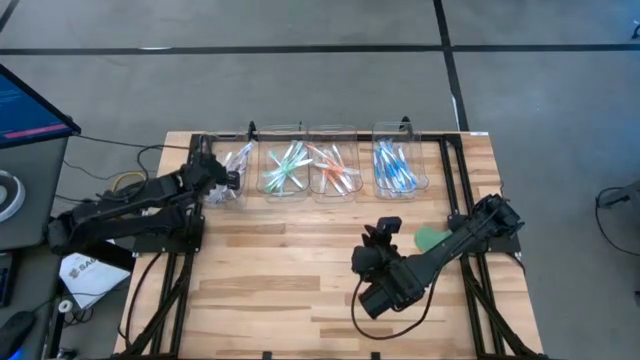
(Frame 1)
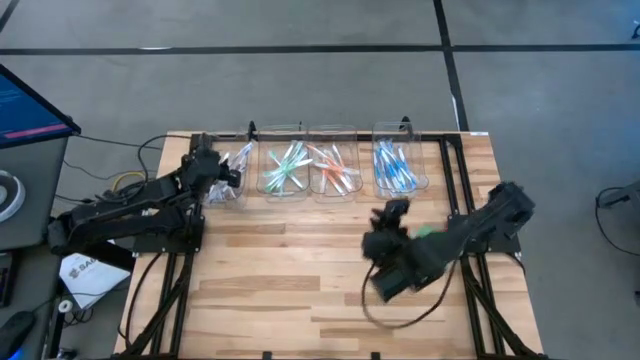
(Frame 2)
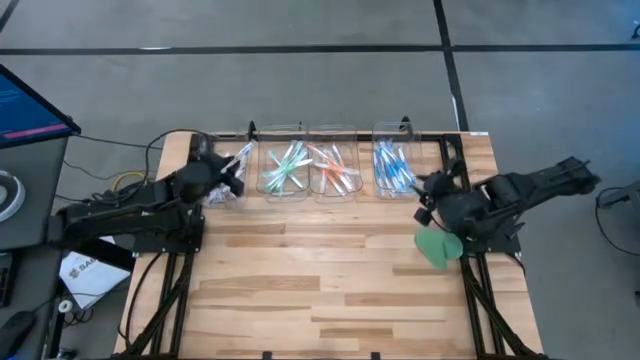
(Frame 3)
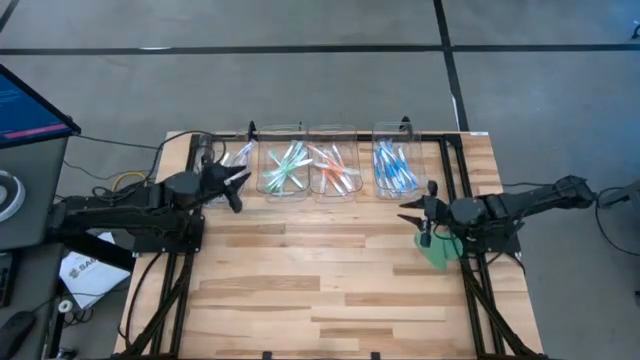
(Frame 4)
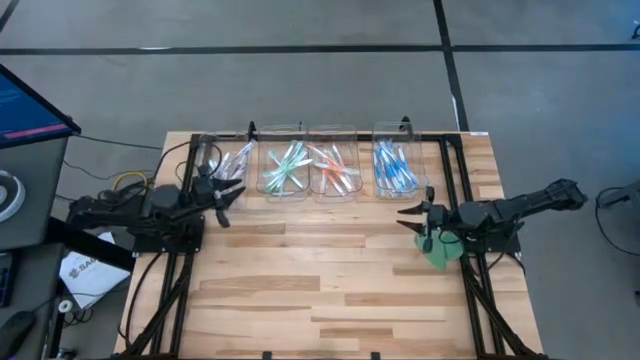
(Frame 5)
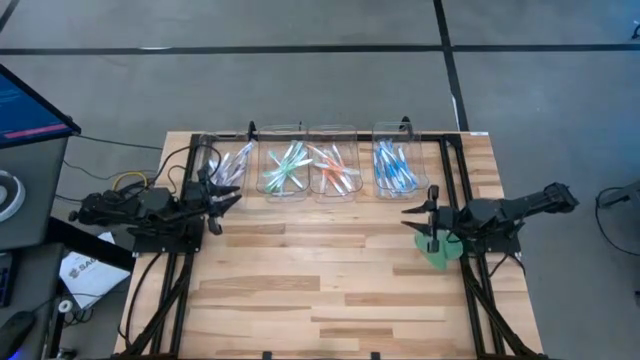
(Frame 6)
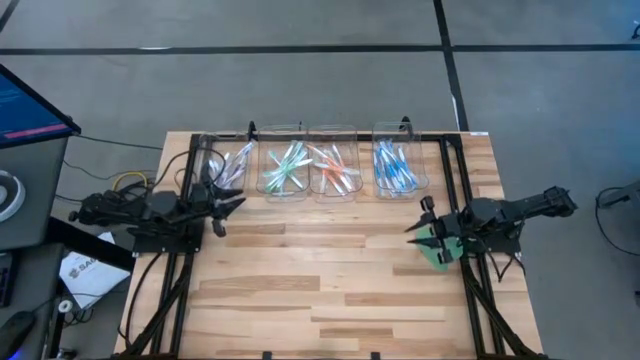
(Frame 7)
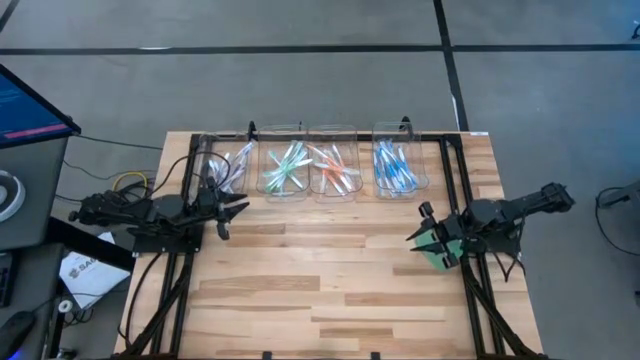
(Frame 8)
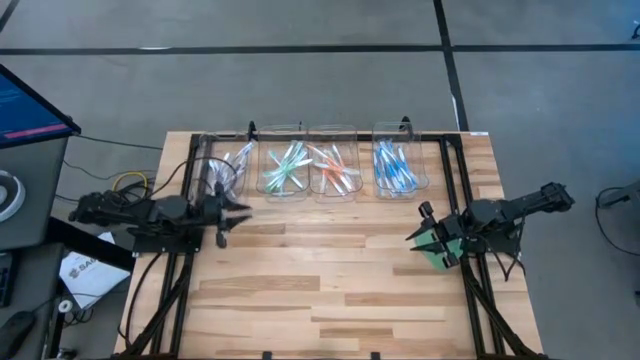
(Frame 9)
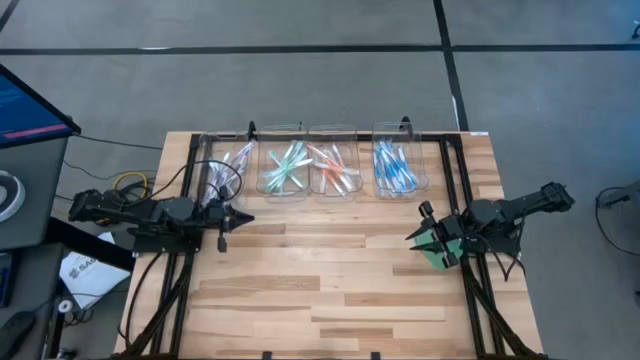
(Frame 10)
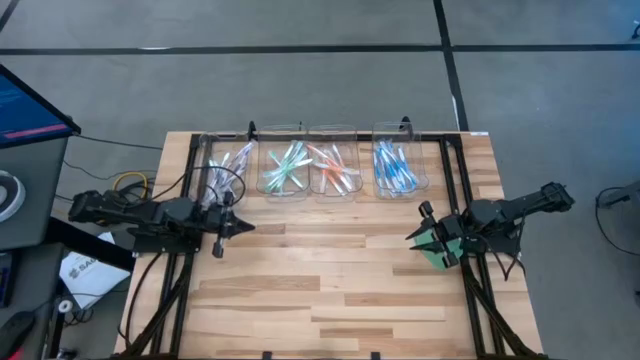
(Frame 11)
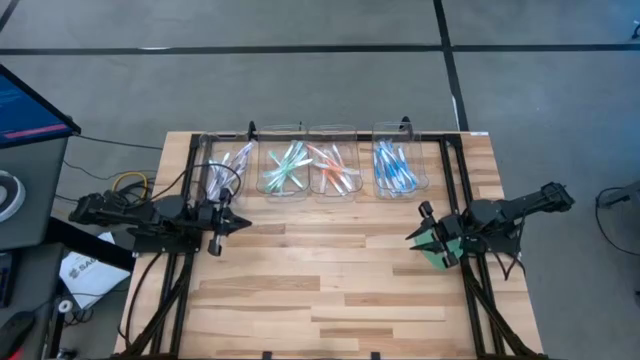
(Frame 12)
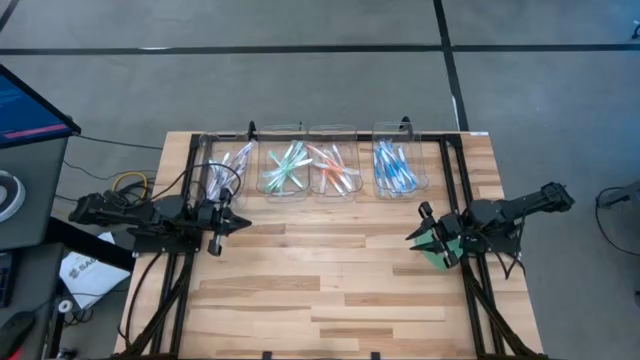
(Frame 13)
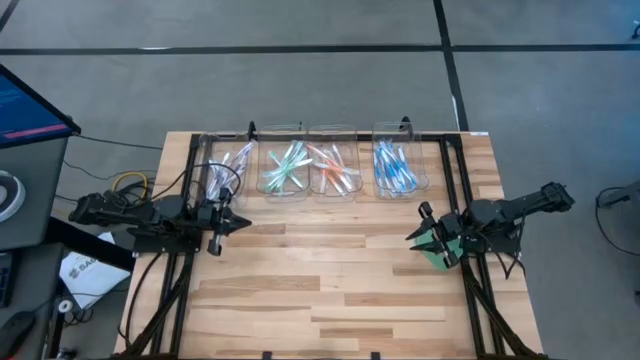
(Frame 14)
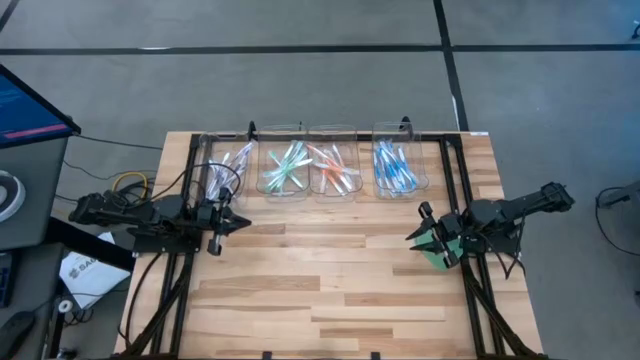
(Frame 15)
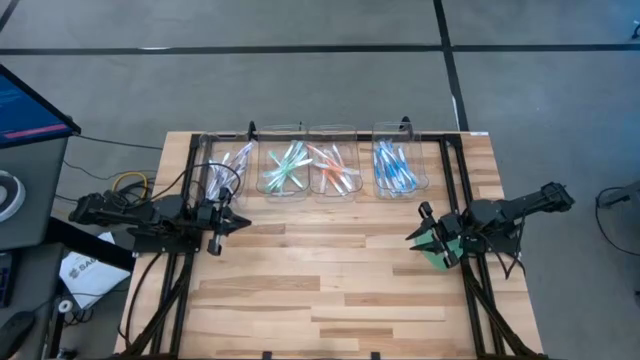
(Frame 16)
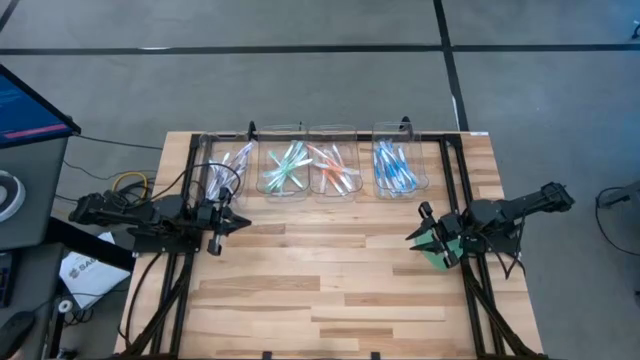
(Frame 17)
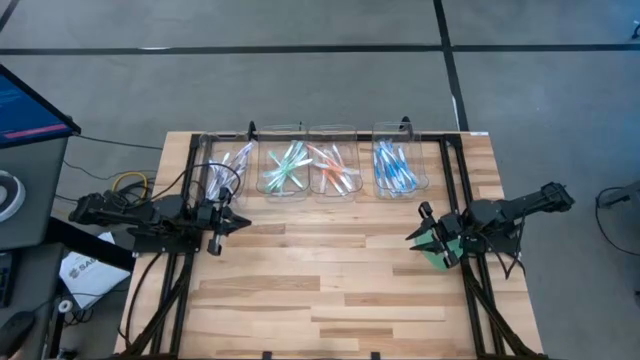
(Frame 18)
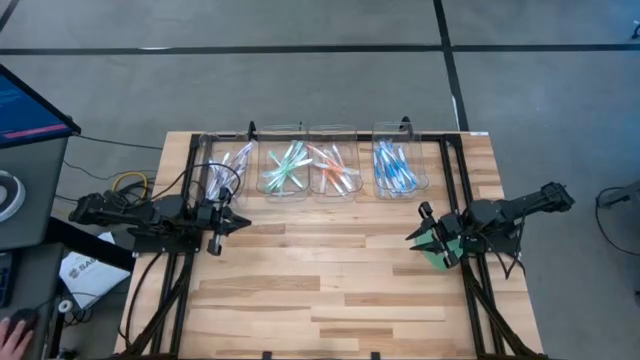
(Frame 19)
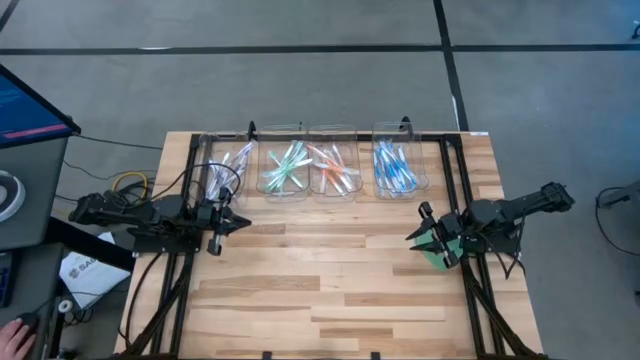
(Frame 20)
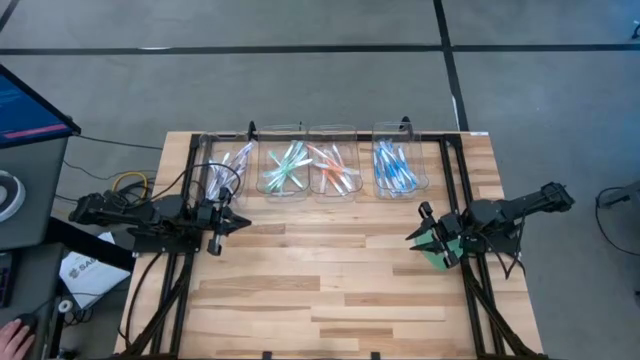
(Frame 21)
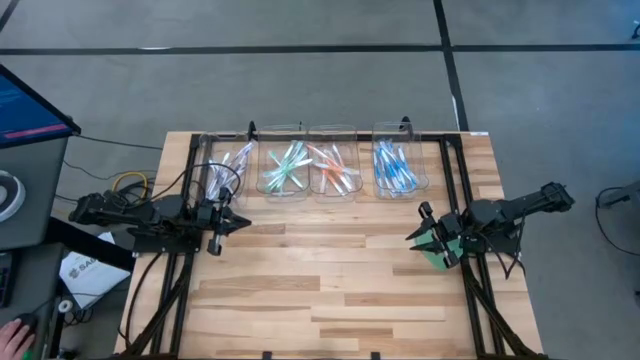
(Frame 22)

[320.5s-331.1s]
Task: Pick & Place Toothbrushes
Return to Home Position

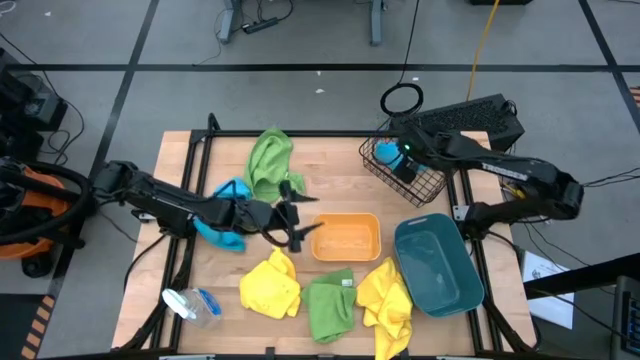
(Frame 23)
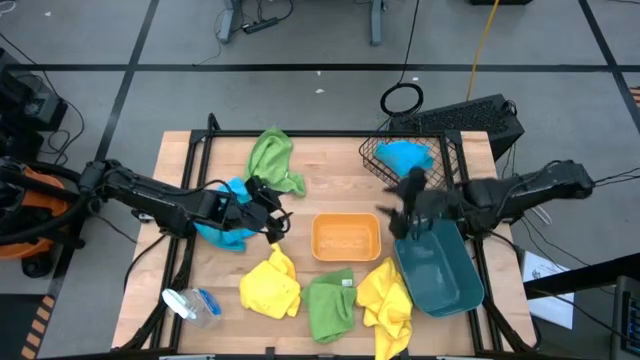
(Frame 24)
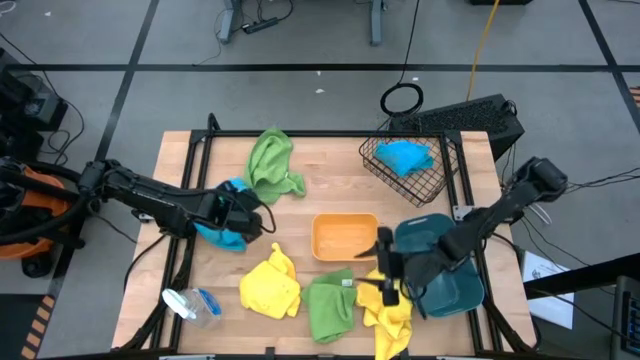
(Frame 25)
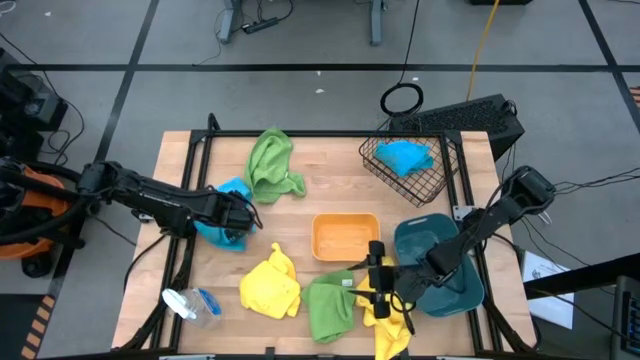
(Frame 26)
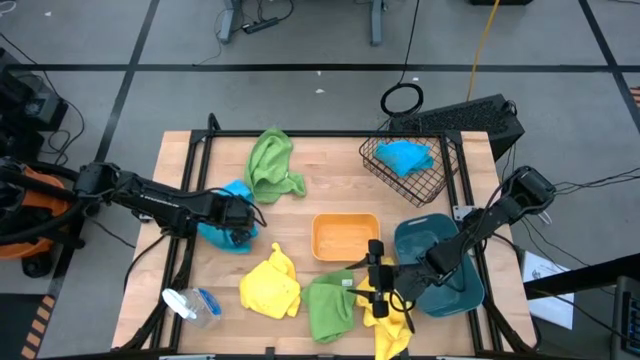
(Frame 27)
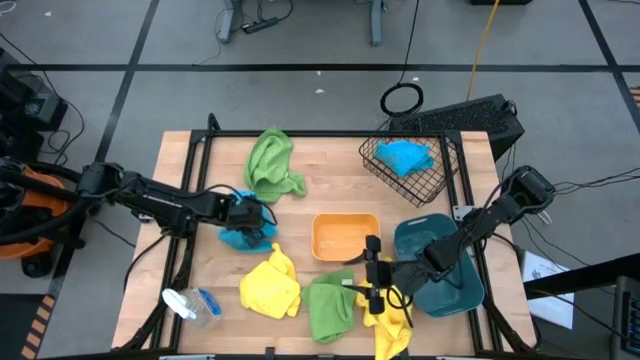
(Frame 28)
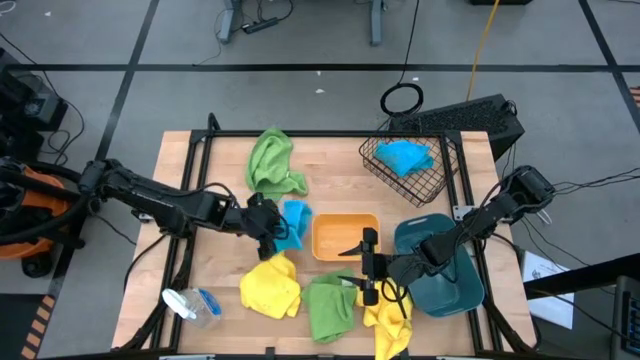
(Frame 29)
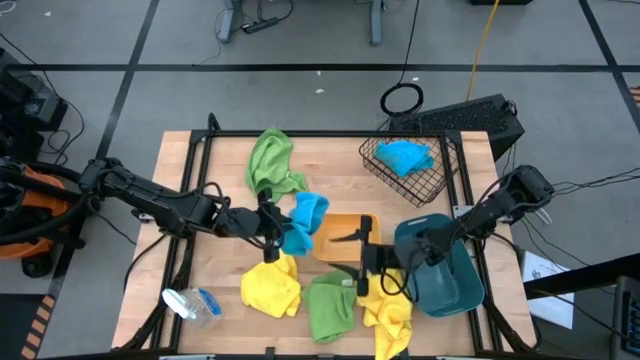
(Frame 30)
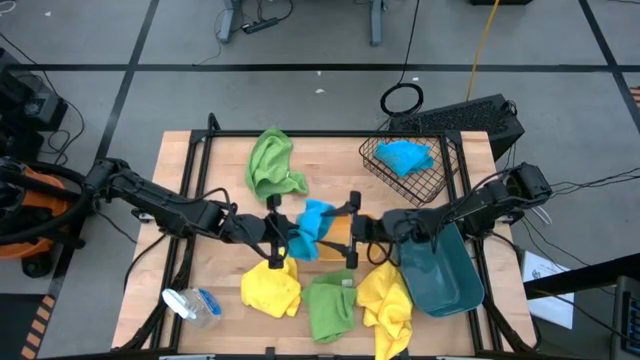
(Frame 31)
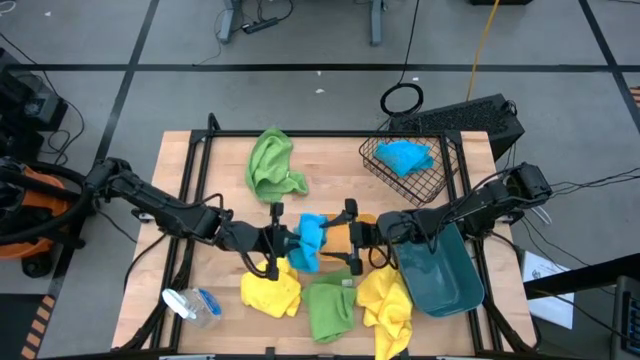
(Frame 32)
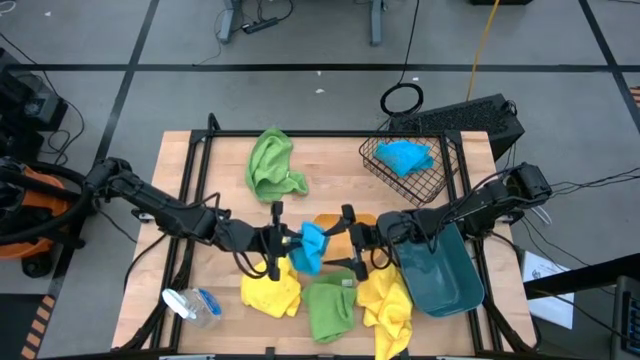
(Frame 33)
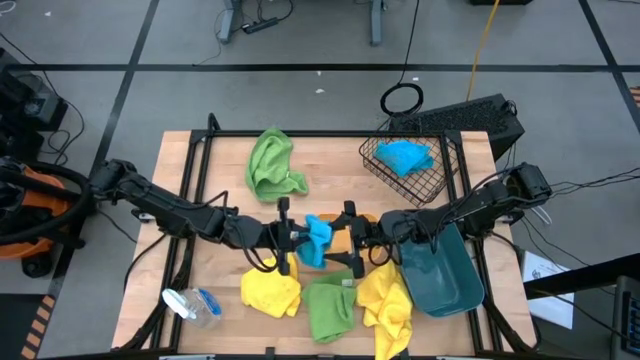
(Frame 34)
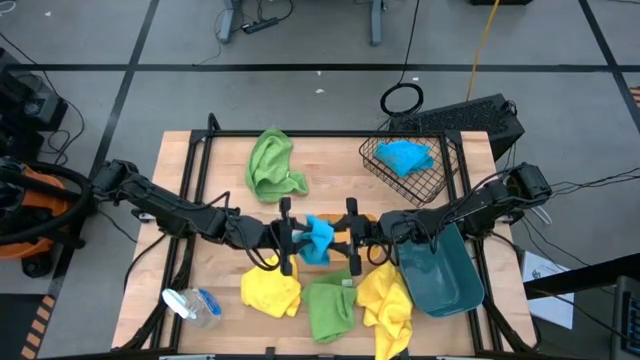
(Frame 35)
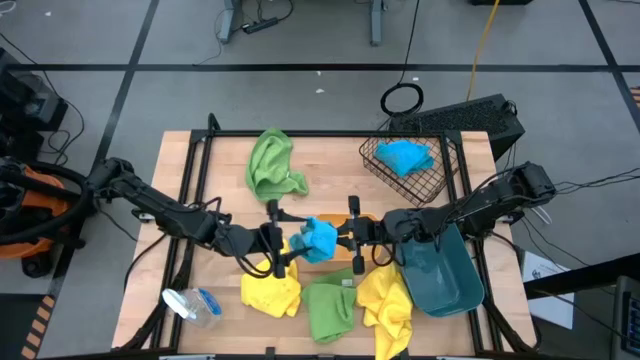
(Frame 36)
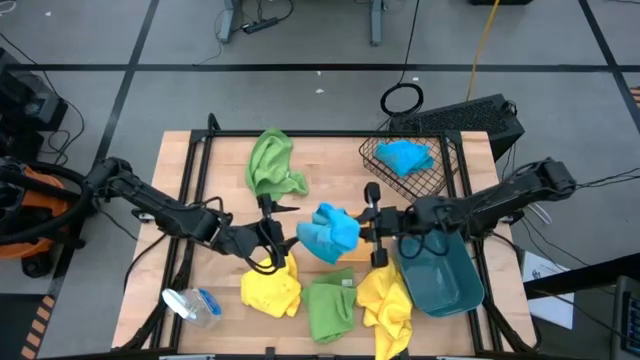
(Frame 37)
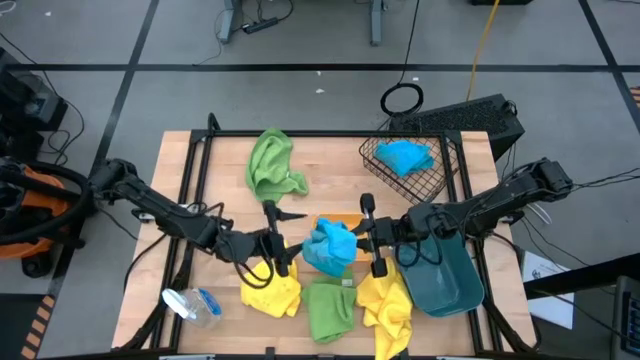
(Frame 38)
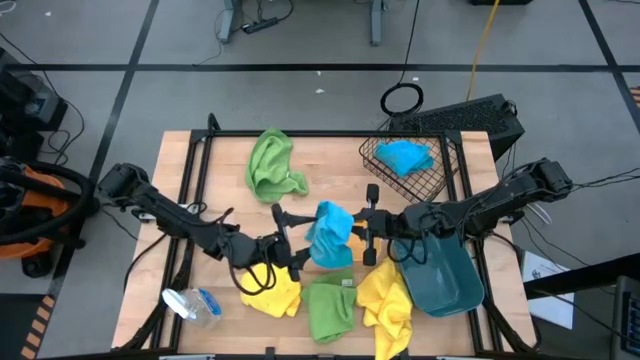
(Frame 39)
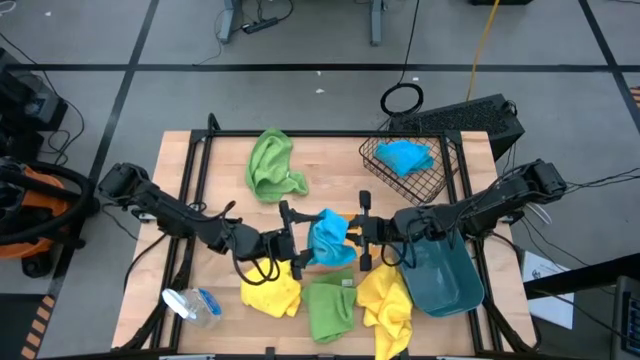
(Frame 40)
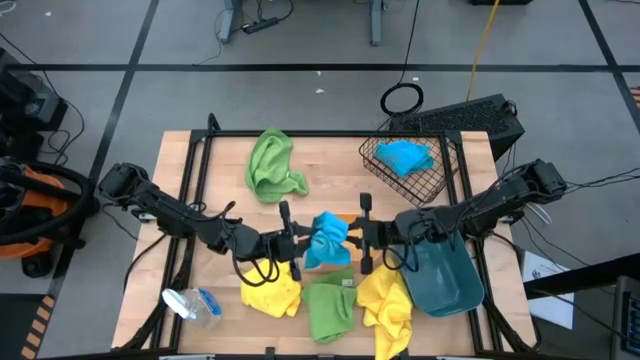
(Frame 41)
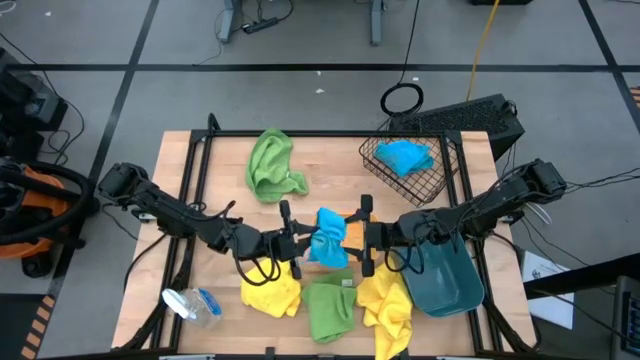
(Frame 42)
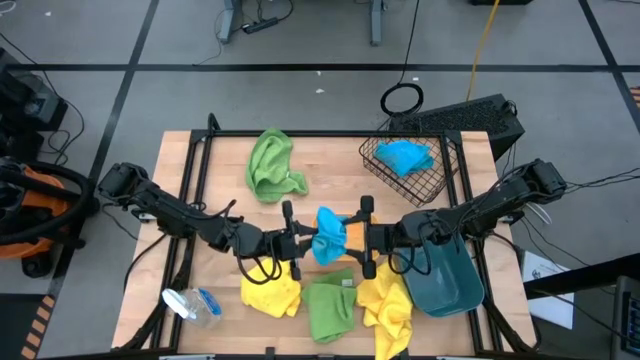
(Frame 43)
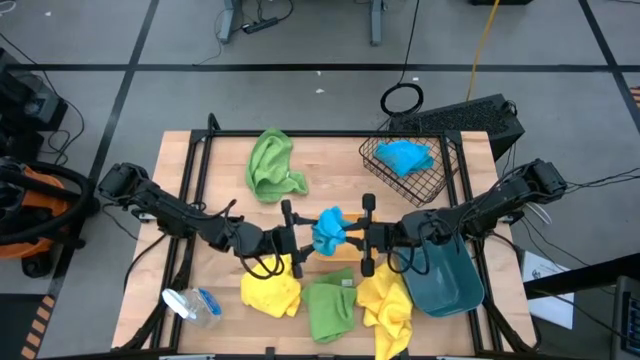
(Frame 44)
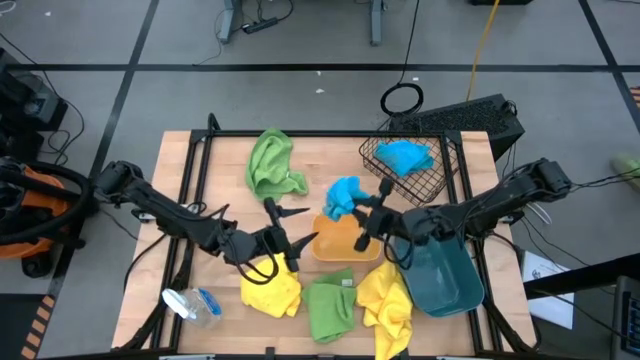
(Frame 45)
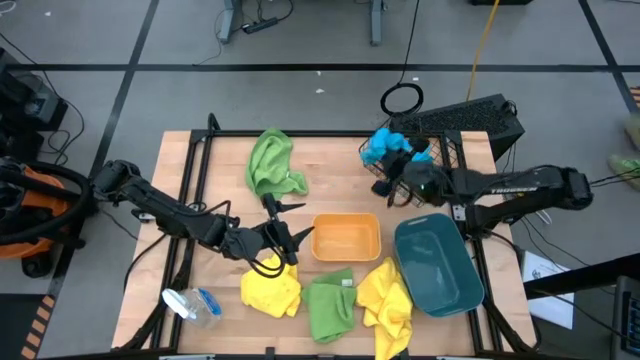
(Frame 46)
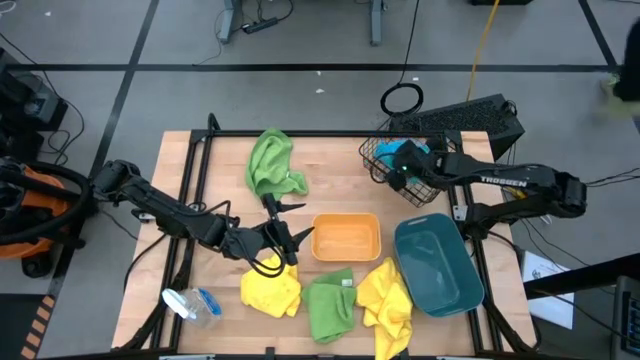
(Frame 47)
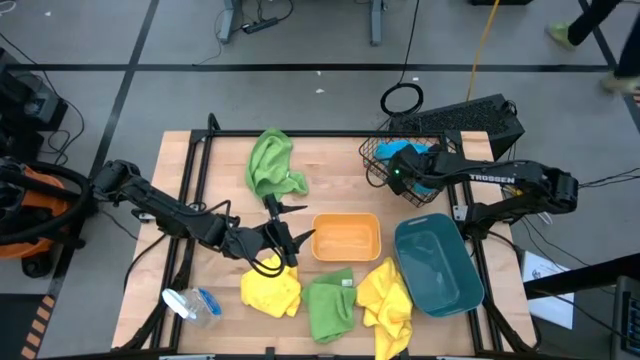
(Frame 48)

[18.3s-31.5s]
Task: Sort microfiber towel by color & place in baskets
Put the blue microfiber cloth into the wire basket
